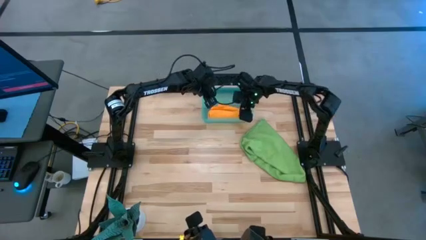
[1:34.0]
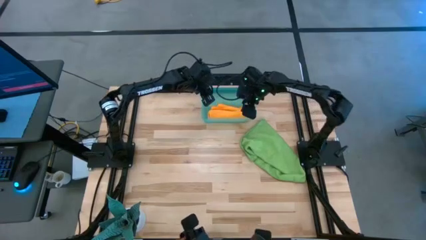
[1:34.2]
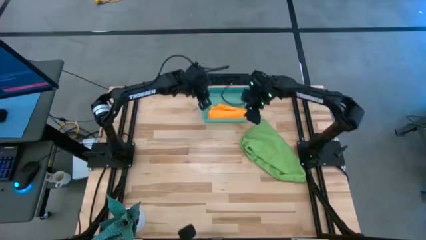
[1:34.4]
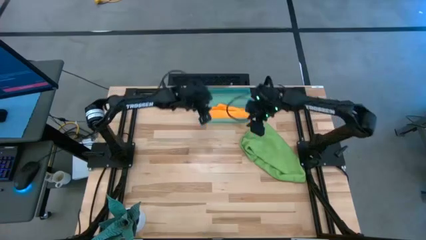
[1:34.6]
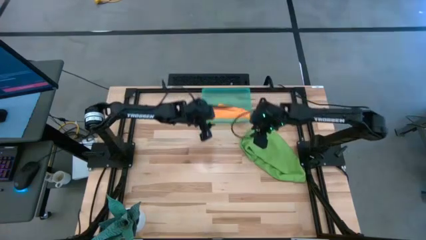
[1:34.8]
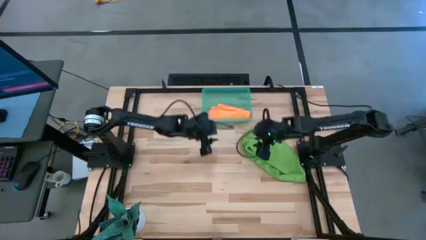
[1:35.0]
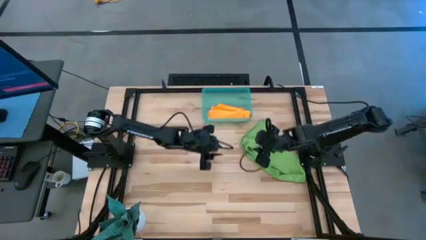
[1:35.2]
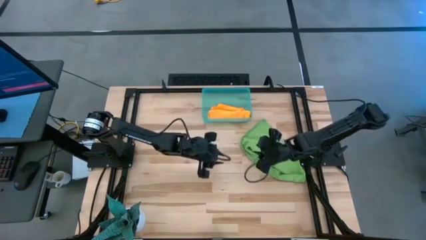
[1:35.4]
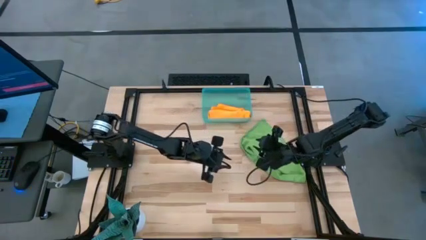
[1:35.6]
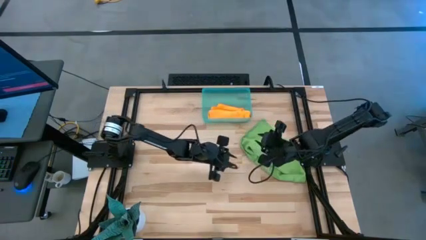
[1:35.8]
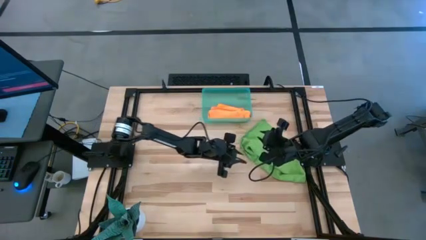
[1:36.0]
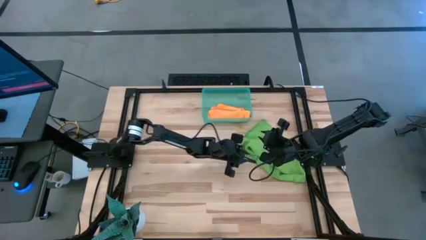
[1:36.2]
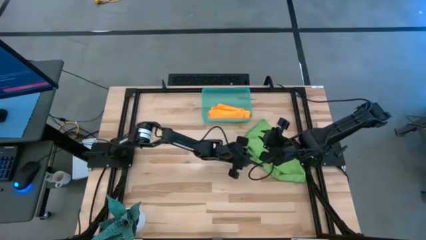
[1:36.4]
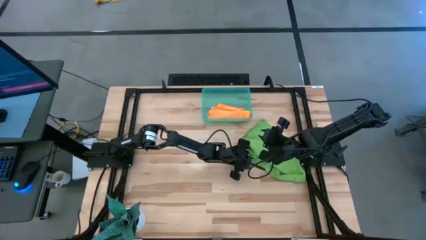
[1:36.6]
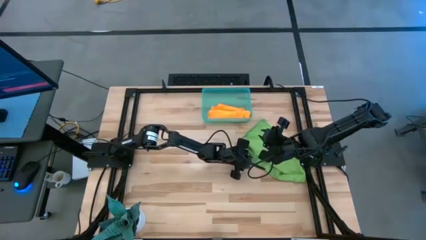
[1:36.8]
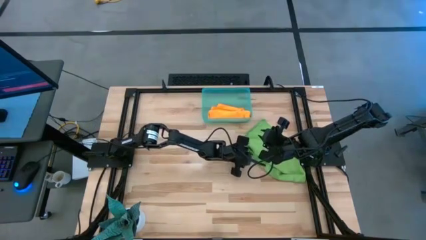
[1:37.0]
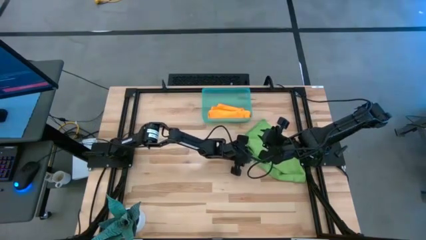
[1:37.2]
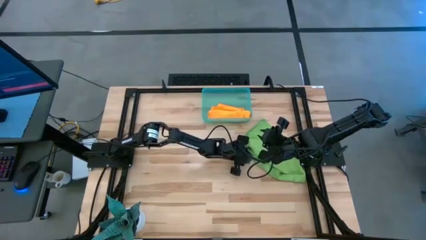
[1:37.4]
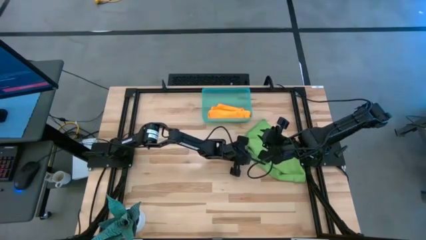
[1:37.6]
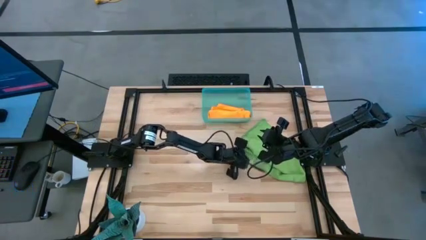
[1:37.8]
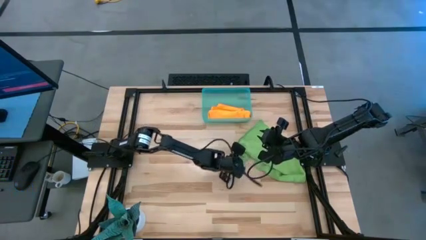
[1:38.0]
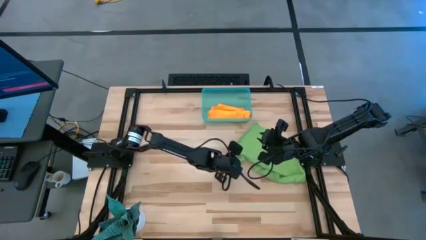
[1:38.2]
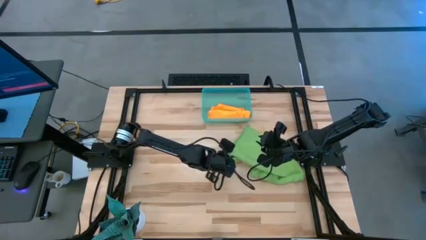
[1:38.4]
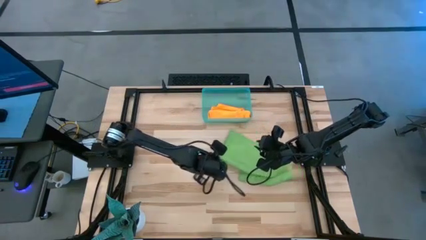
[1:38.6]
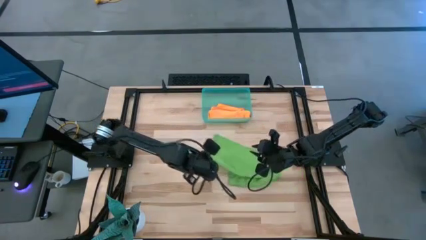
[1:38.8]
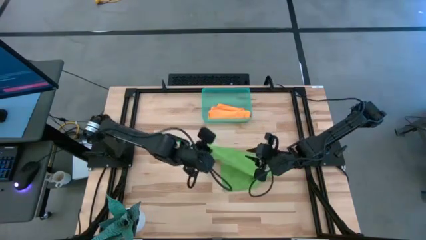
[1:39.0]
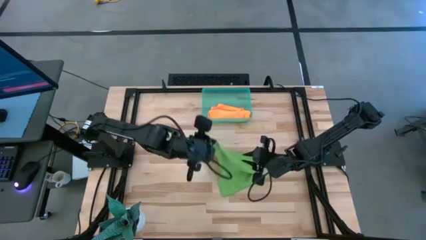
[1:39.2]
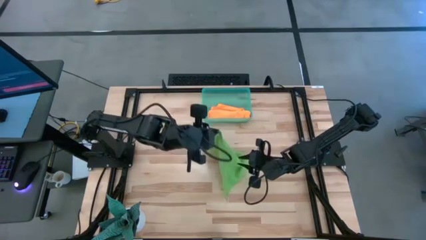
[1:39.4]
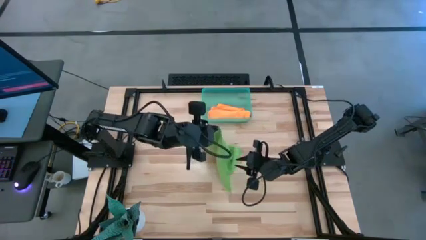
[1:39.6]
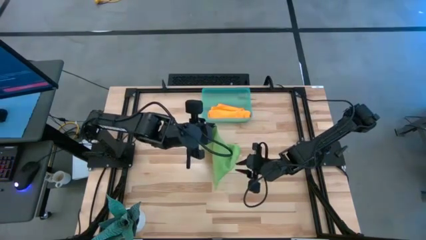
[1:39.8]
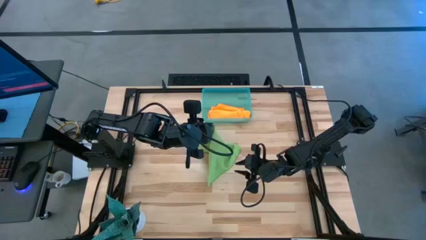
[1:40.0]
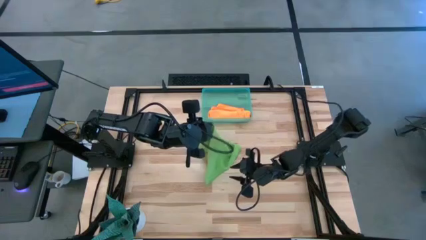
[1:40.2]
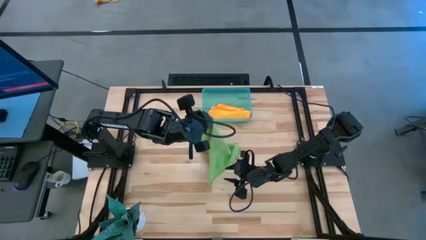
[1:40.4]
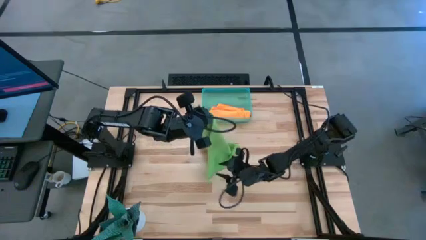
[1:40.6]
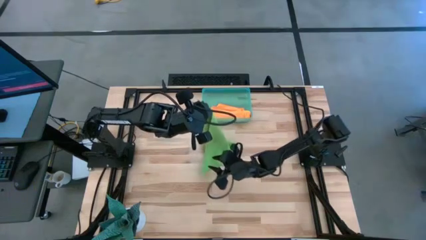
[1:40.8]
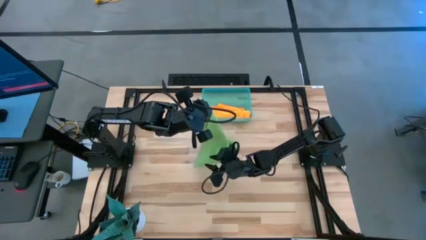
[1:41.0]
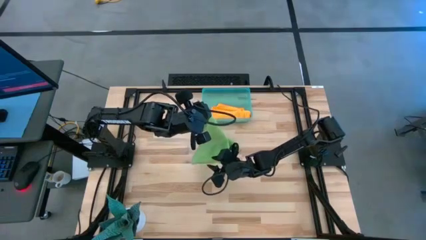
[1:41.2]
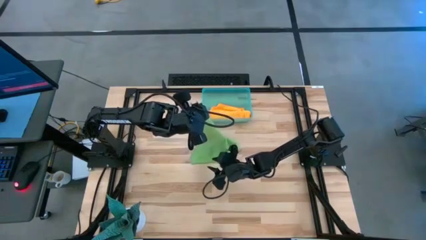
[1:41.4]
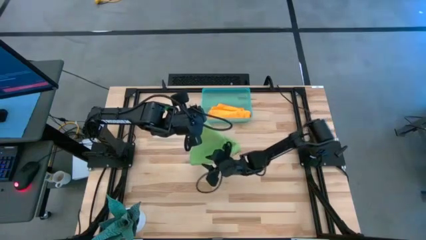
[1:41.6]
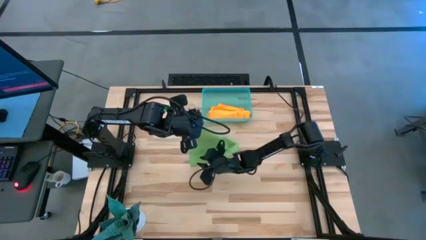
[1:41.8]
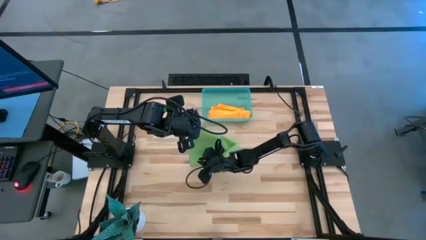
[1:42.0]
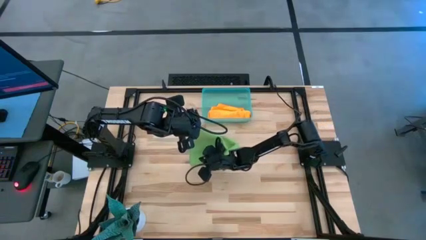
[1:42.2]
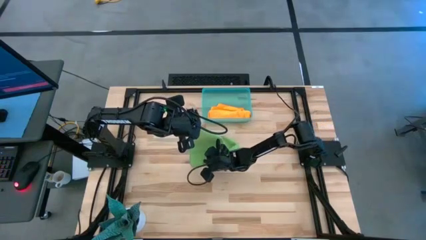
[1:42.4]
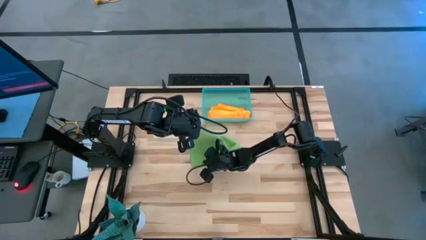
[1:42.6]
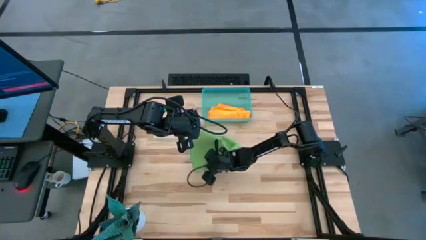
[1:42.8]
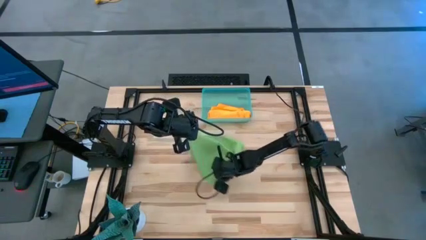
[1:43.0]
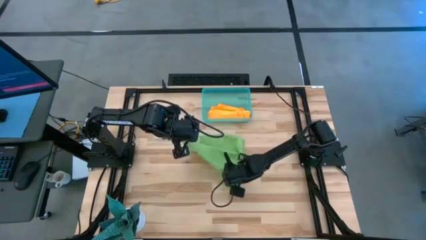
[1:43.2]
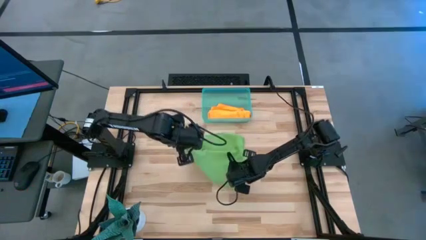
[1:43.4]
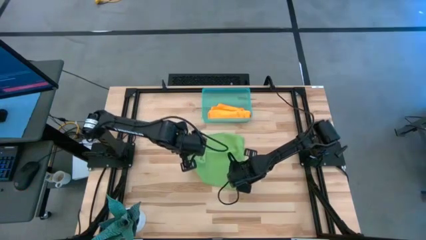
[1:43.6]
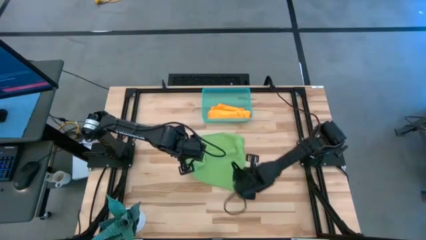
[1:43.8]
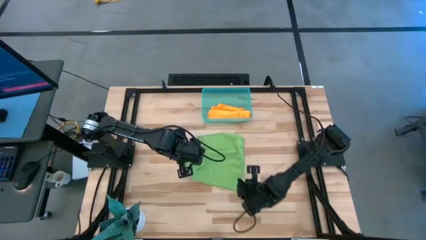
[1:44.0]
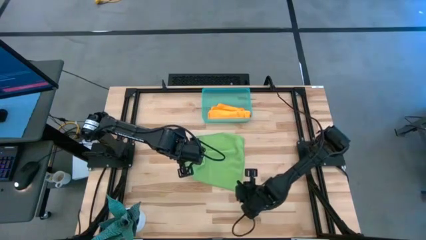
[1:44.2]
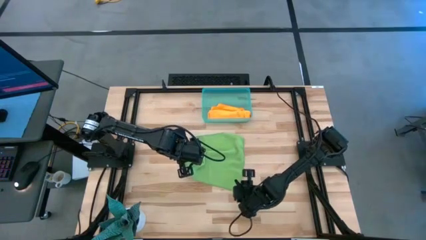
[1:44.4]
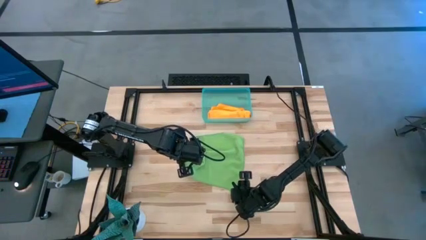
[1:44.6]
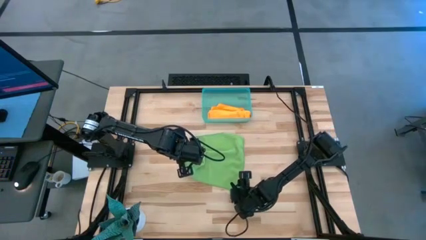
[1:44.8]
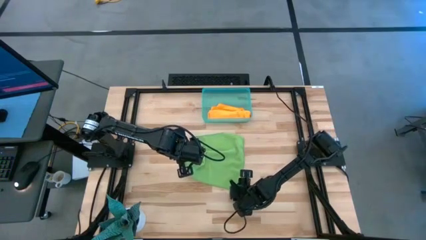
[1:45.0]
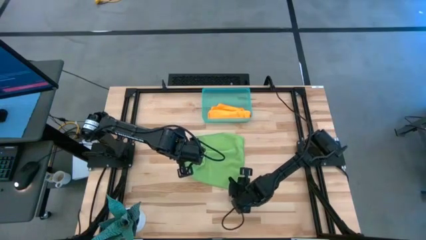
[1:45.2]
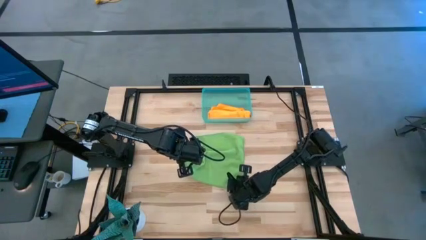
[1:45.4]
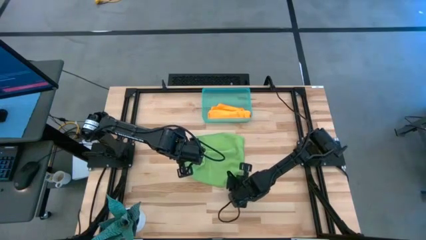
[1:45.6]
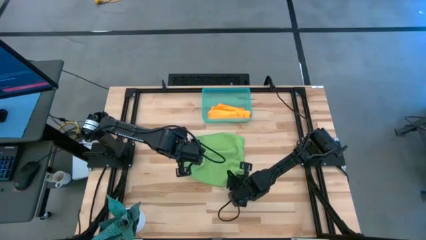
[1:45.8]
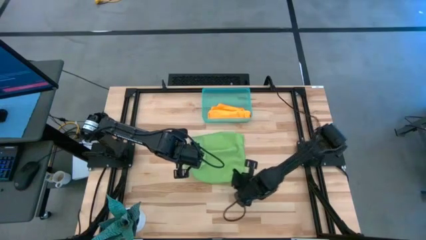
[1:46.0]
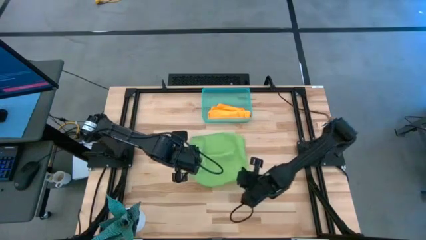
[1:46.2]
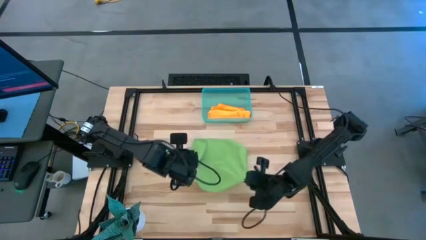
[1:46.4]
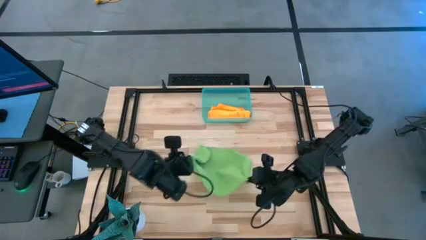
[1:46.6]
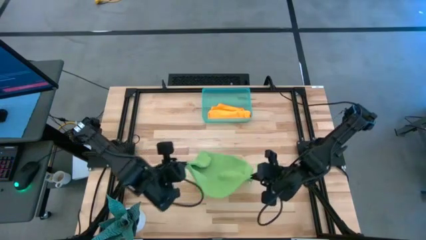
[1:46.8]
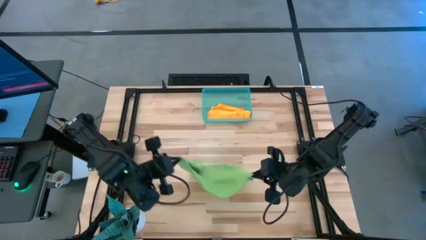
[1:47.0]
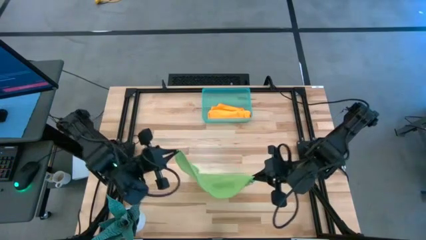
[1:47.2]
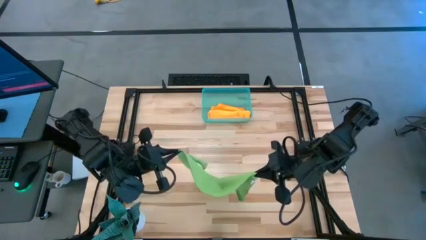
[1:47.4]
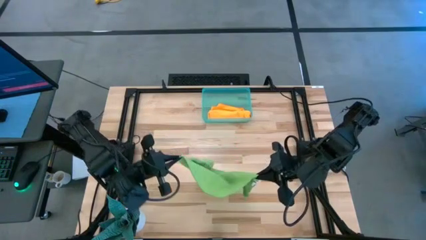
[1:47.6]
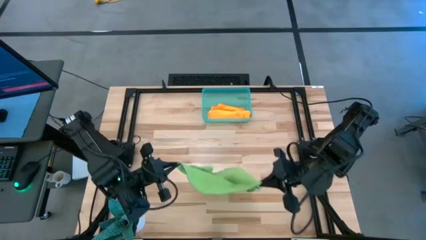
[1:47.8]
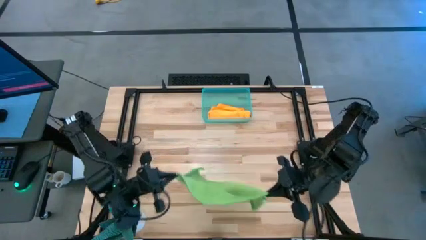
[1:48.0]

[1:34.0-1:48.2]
Task: Roll microfiber towels into tight, uniform cylinder then place into a basket
Fold the green microfiber towel
